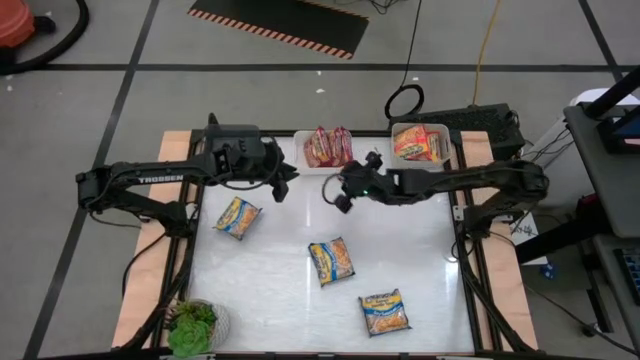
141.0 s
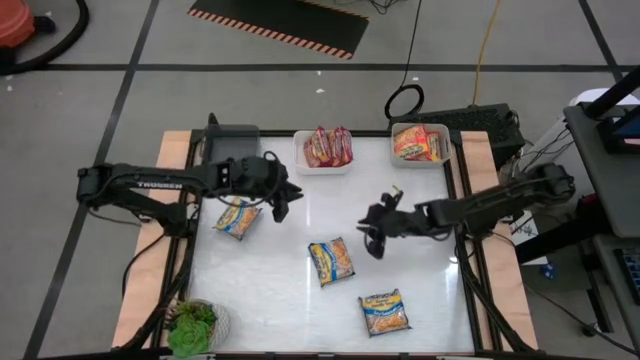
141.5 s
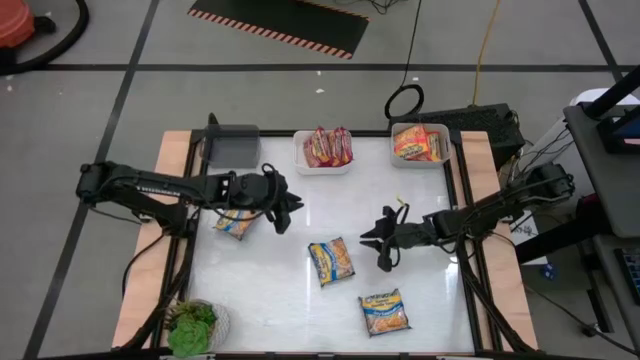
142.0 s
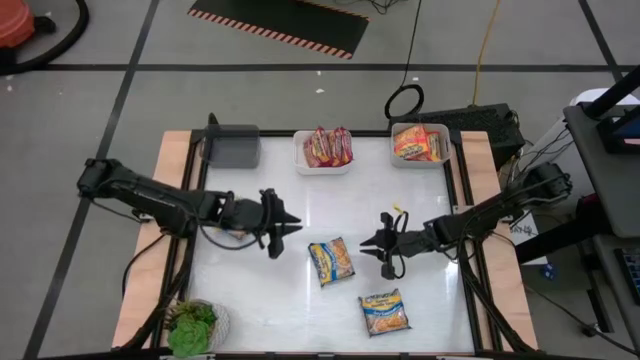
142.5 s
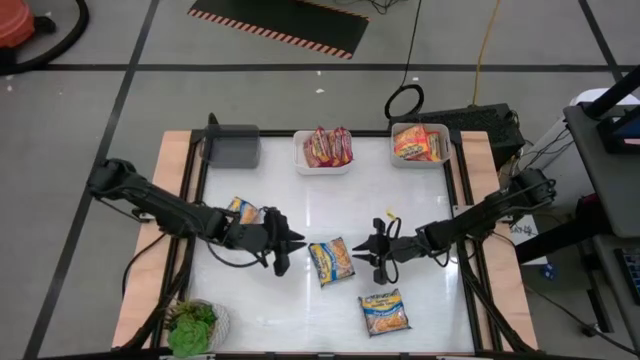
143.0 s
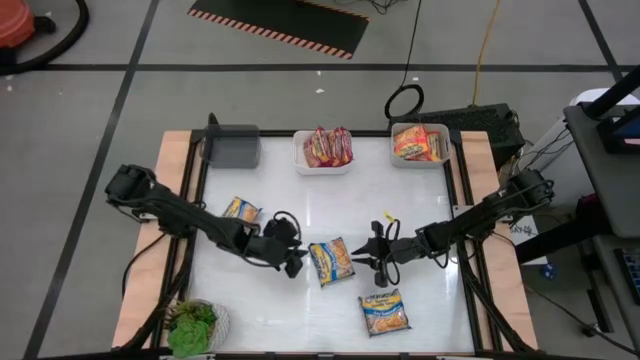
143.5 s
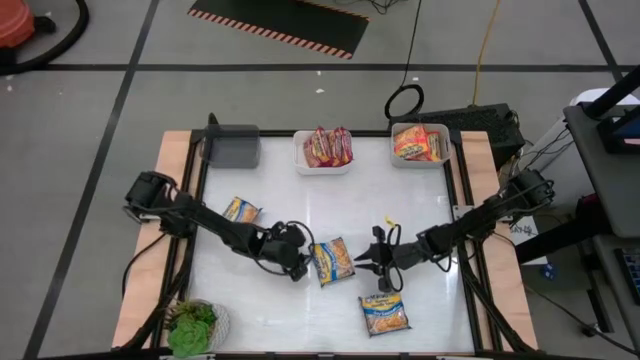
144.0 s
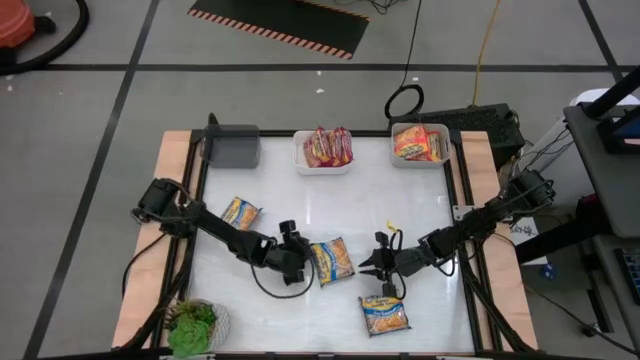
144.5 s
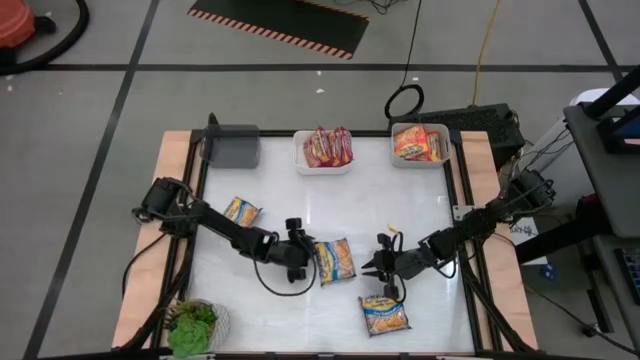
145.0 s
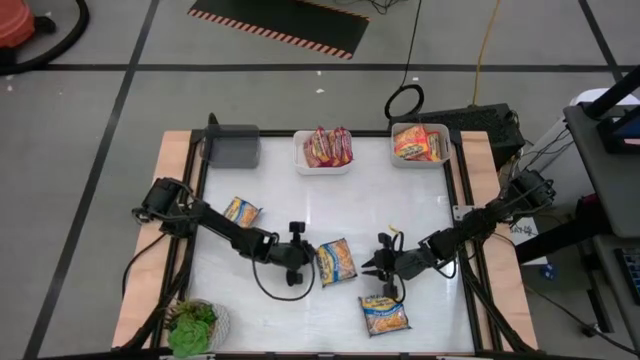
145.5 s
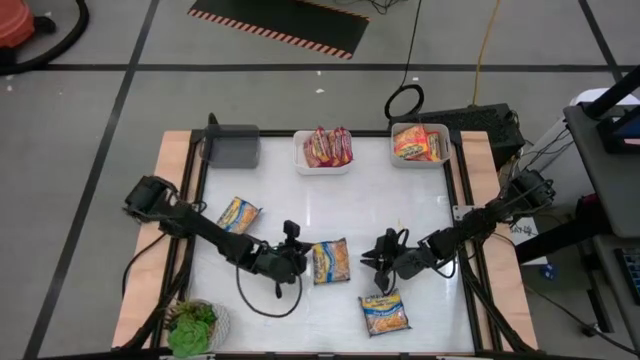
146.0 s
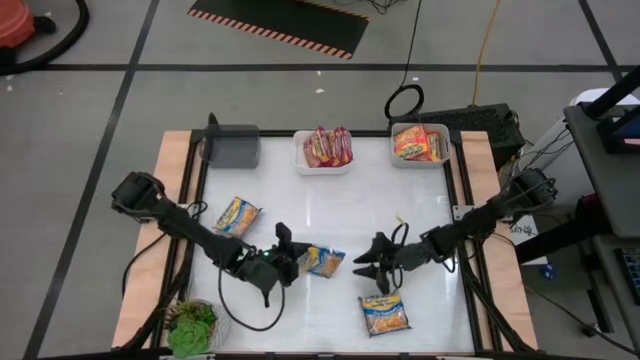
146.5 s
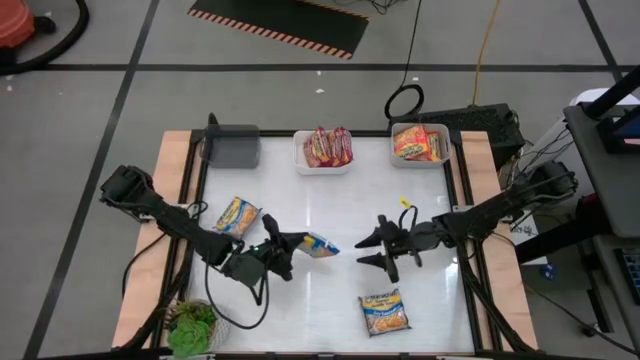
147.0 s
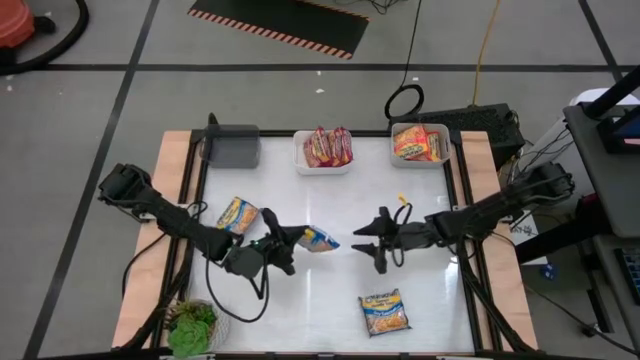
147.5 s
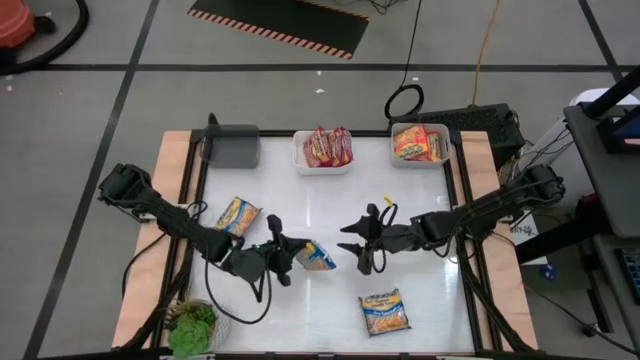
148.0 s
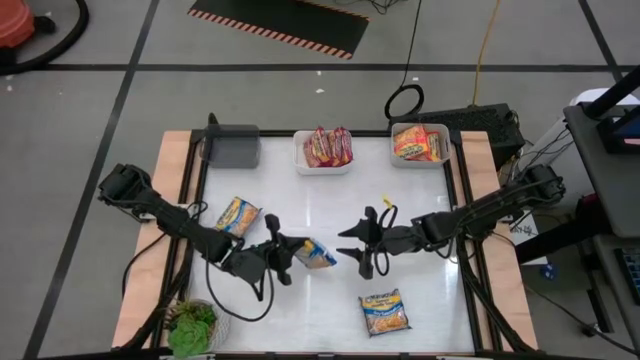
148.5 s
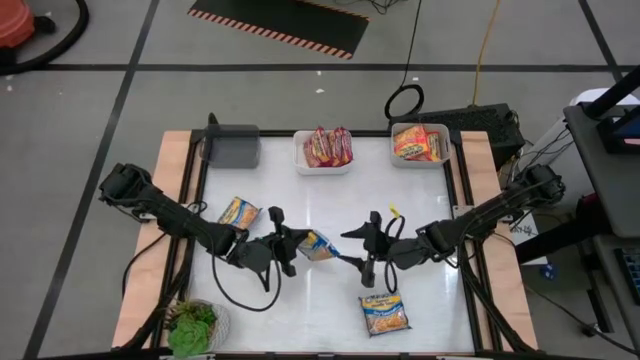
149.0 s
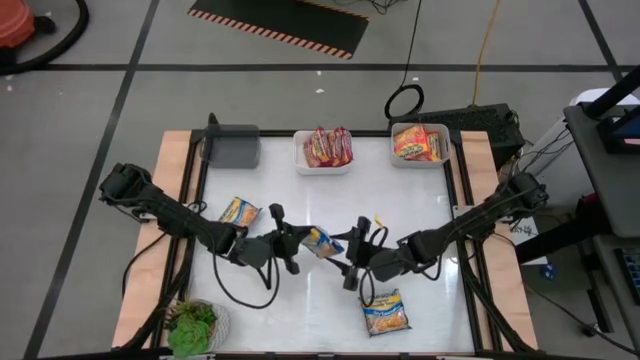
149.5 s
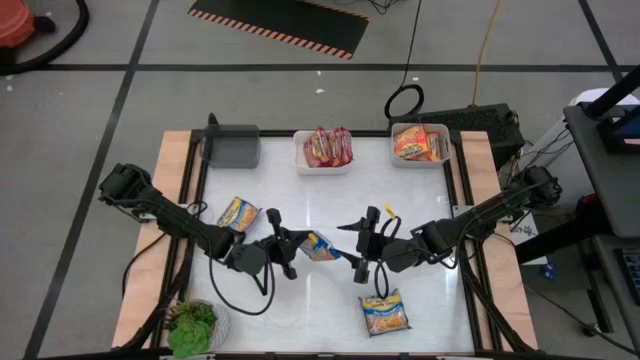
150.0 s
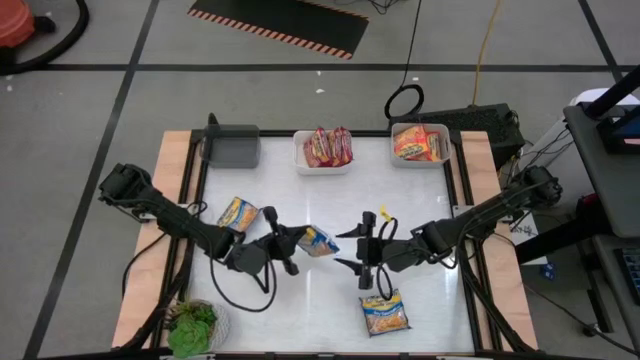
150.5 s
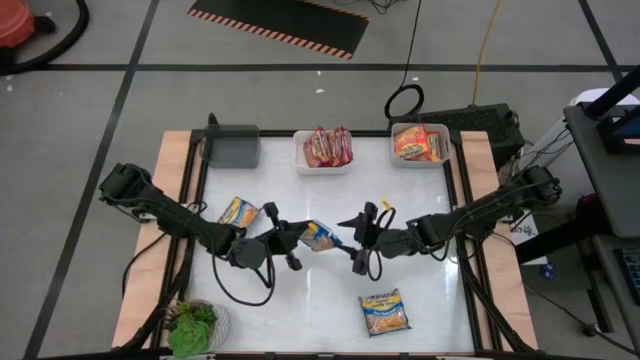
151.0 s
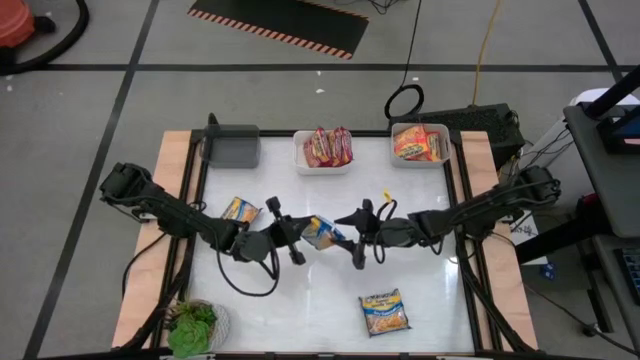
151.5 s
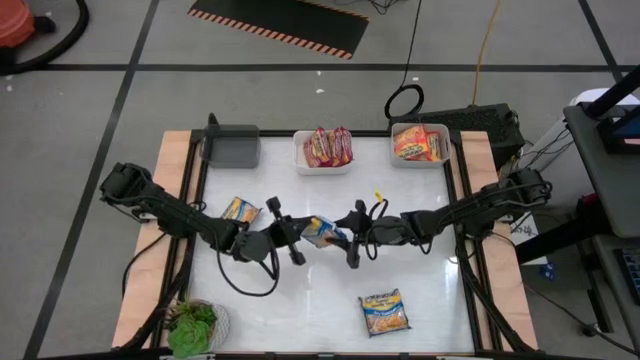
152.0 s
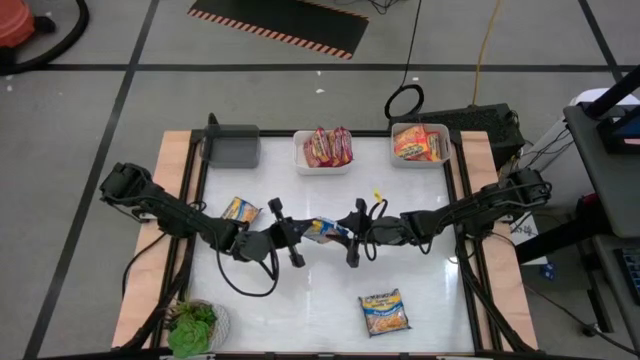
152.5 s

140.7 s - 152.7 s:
Task: Sort Maruchan noodles
Put the middle blue noodle pack into the black bin

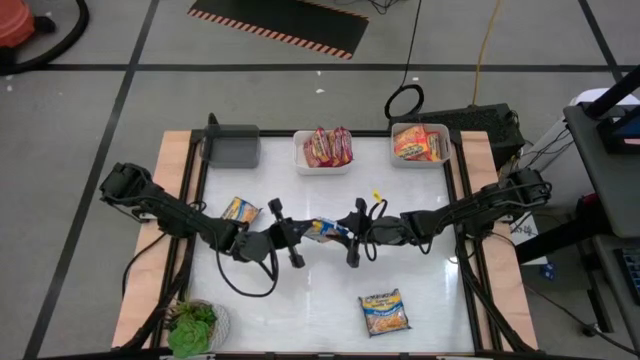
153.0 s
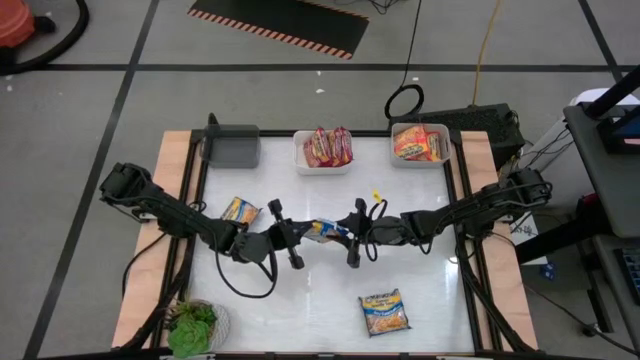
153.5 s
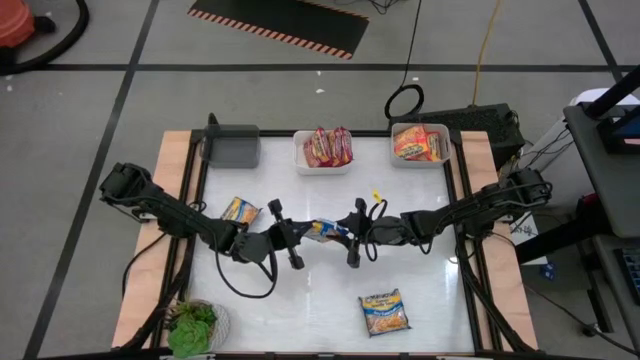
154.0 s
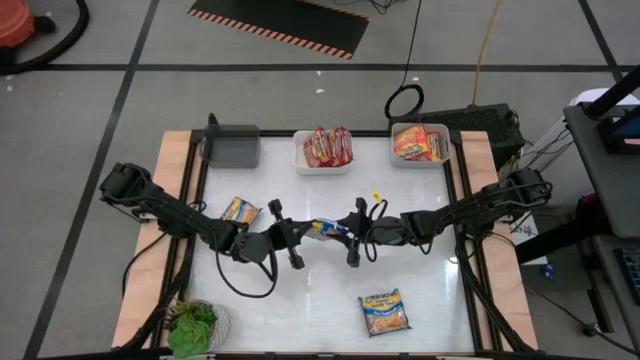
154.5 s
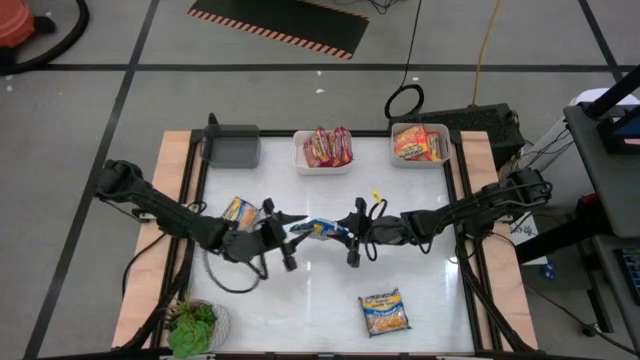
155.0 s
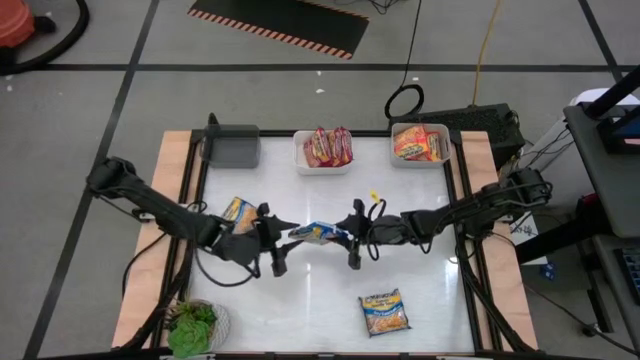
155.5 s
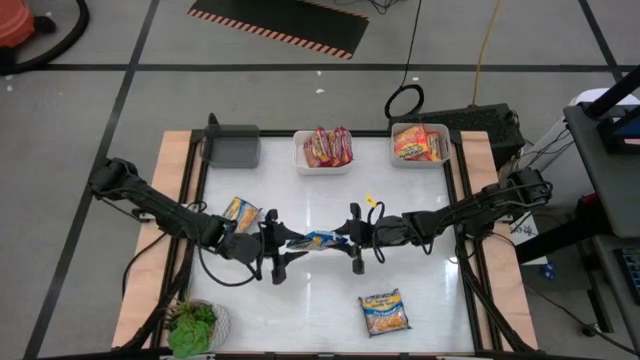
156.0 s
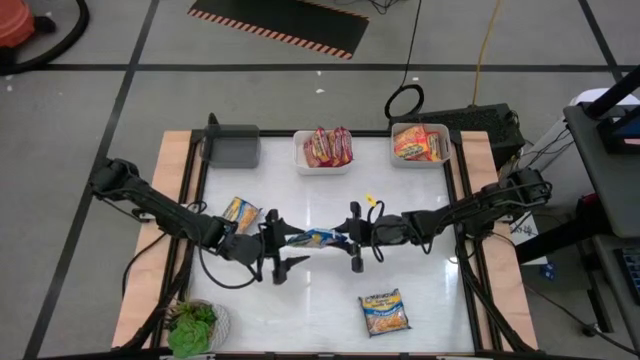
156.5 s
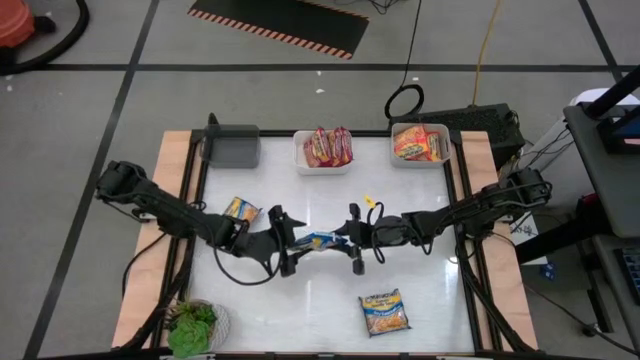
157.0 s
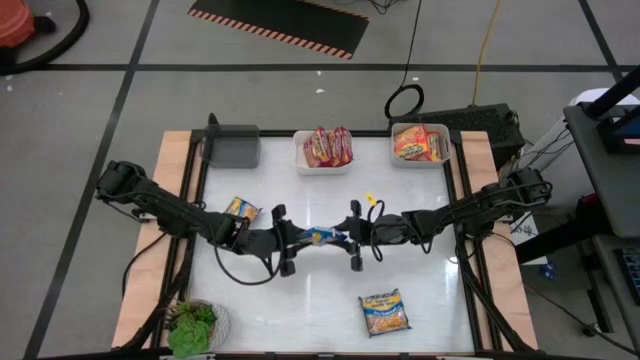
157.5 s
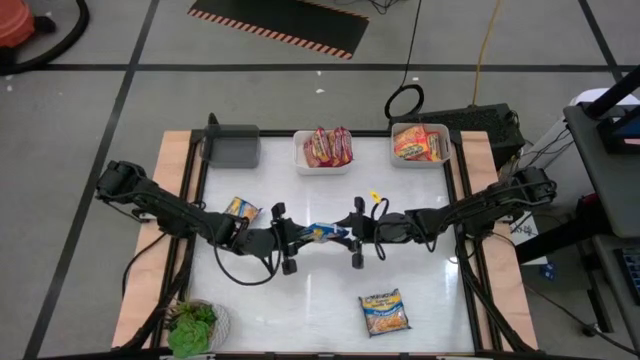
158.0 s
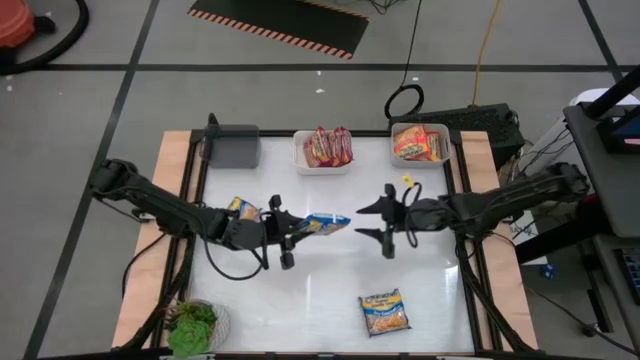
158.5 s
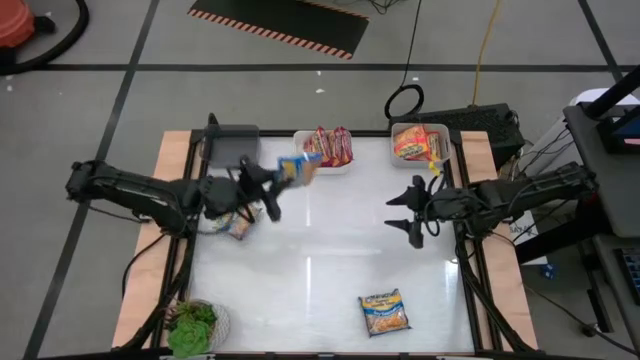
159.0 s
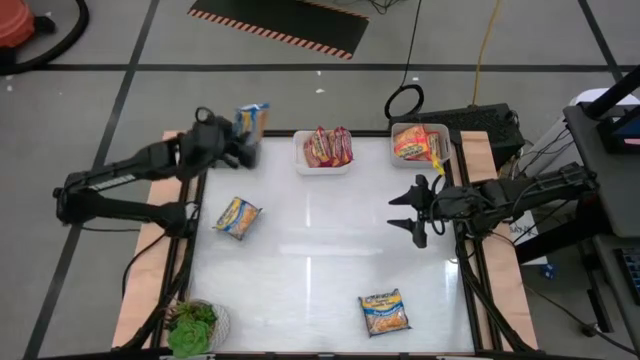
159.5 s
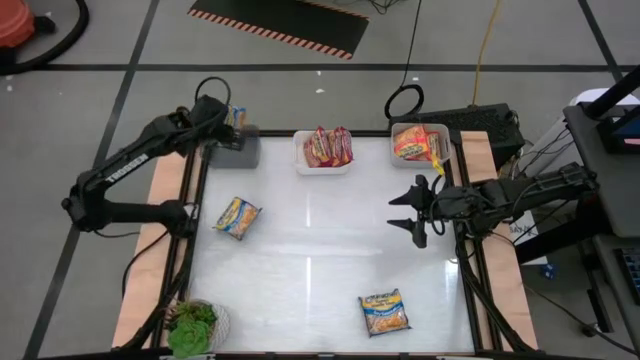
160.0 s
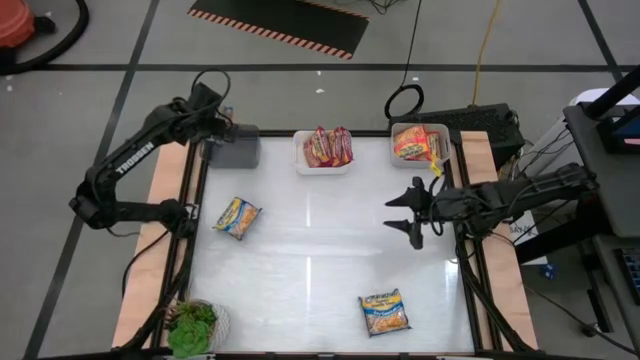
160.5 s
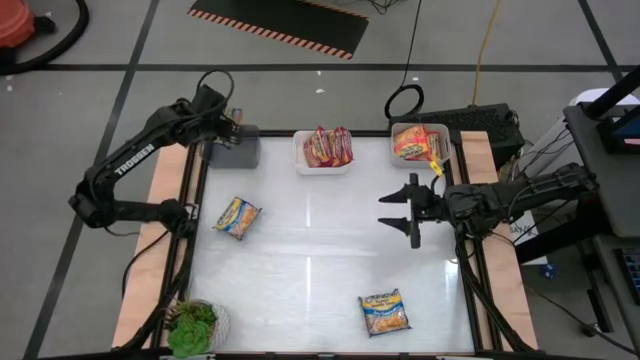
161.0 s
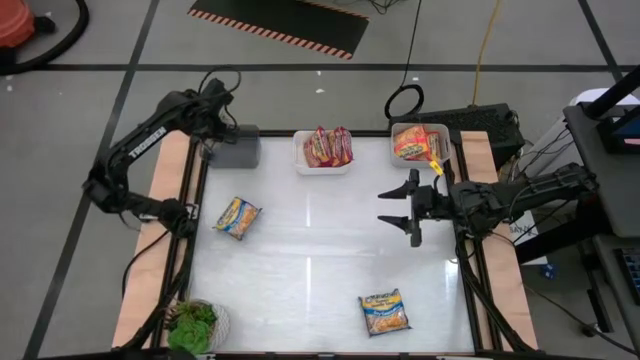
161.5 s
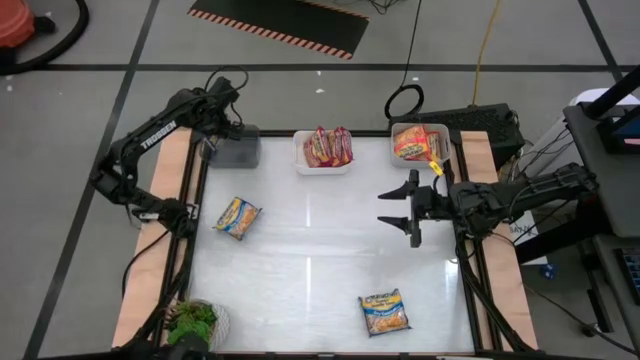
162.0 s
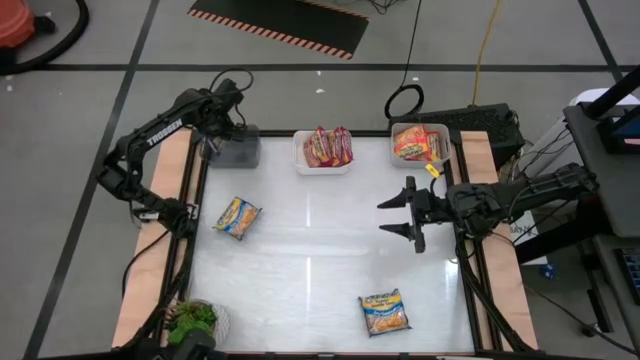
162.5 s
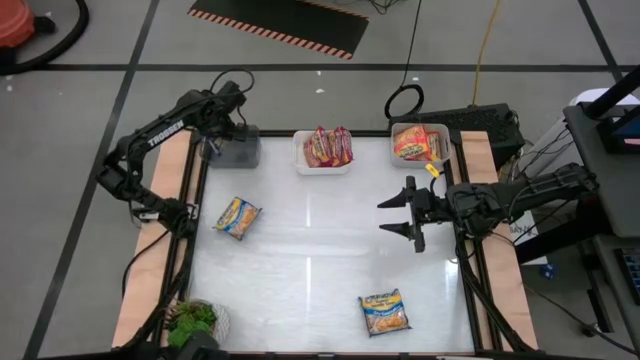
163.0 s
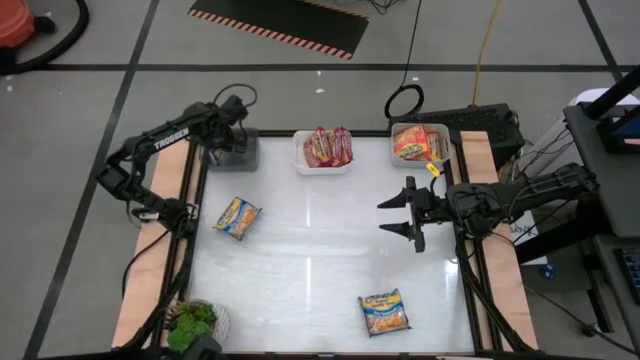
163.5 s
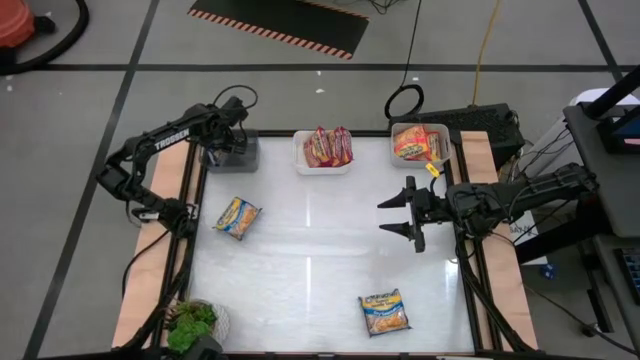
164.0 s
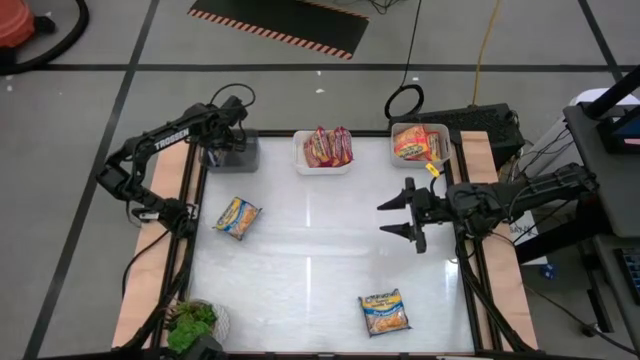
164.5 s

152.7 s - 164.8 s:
Put the middle blue noodle pack into the black bin
